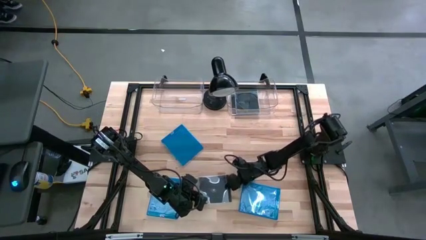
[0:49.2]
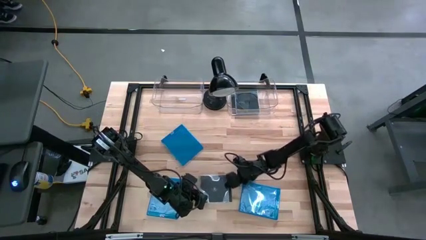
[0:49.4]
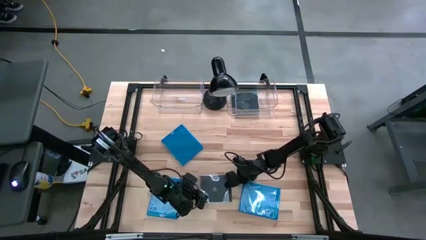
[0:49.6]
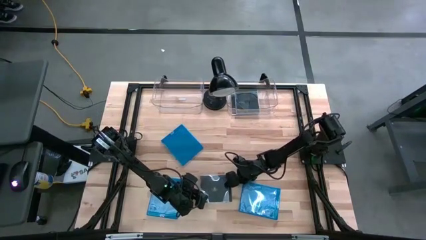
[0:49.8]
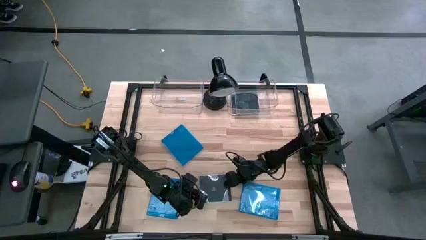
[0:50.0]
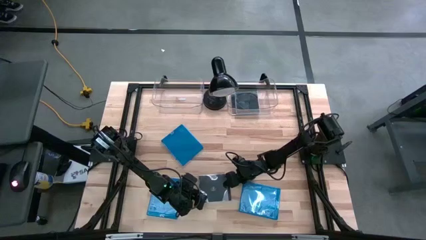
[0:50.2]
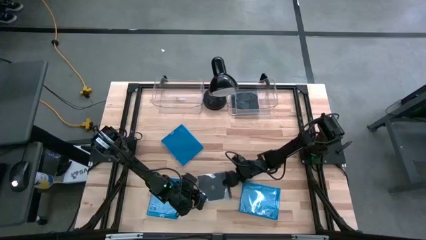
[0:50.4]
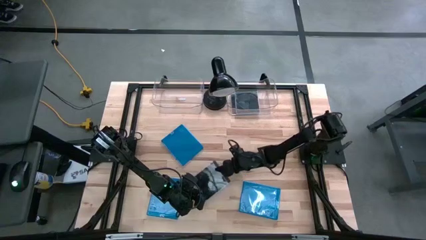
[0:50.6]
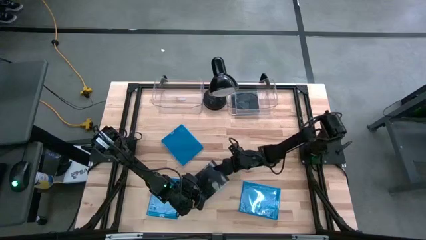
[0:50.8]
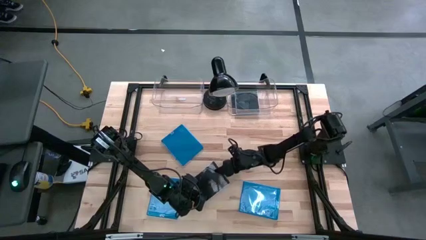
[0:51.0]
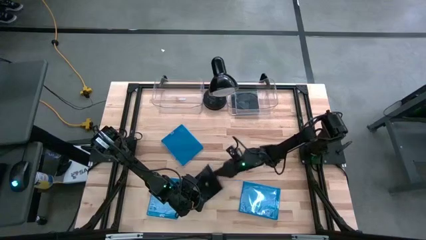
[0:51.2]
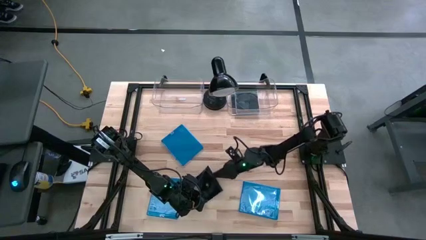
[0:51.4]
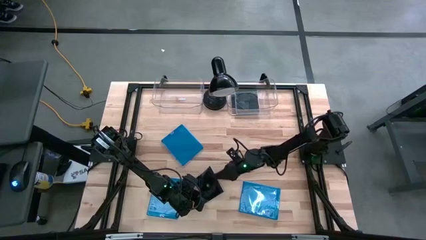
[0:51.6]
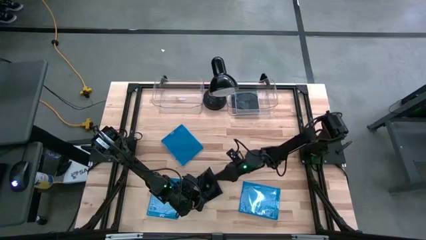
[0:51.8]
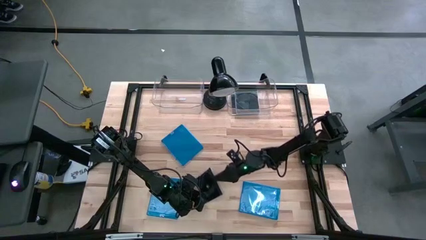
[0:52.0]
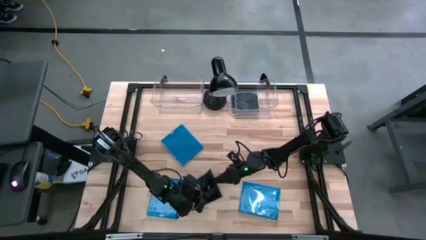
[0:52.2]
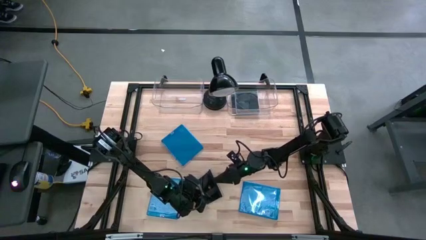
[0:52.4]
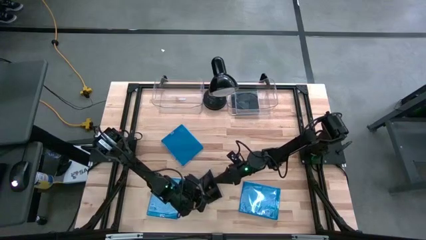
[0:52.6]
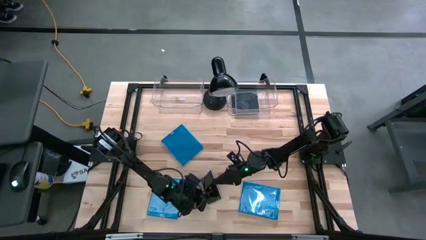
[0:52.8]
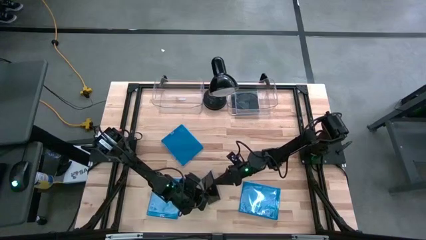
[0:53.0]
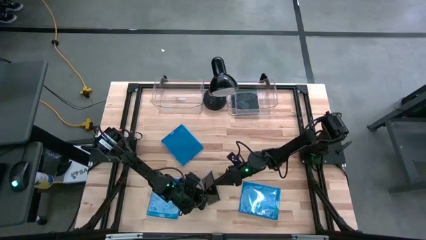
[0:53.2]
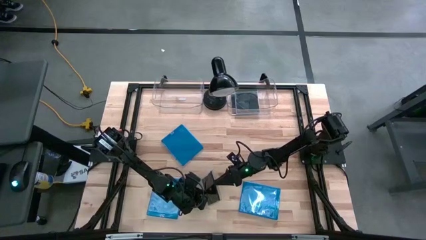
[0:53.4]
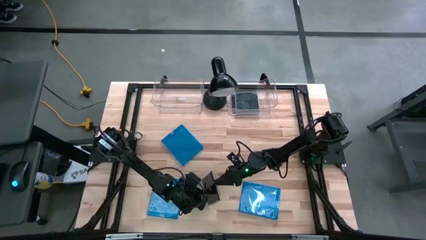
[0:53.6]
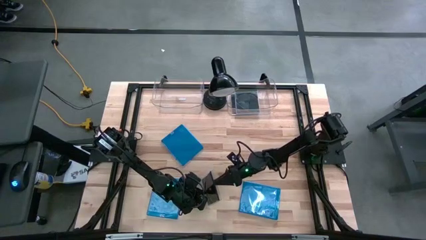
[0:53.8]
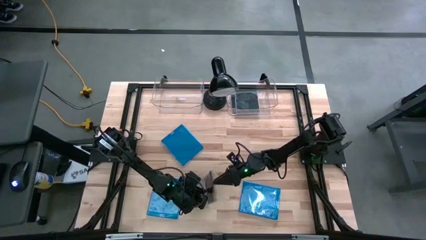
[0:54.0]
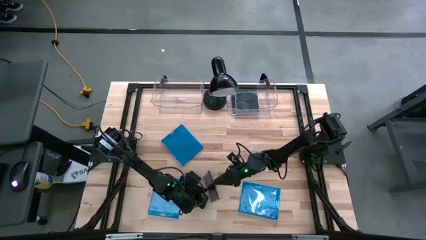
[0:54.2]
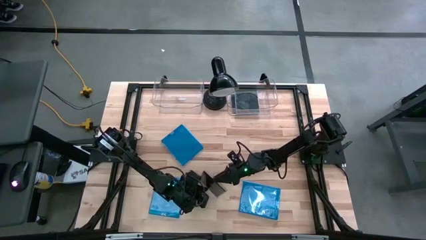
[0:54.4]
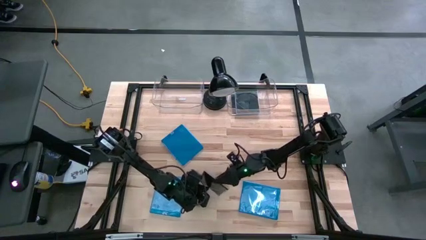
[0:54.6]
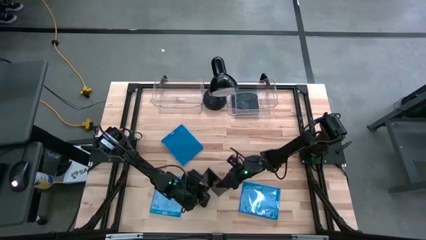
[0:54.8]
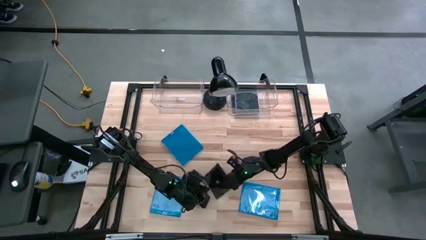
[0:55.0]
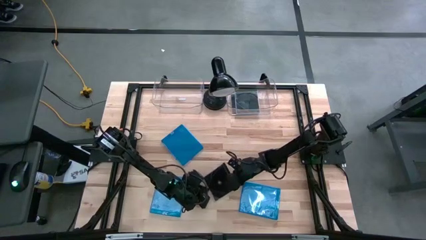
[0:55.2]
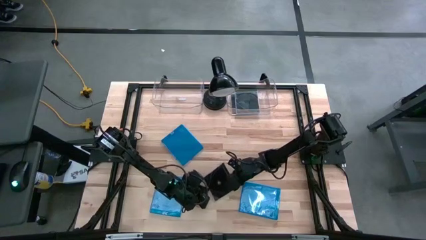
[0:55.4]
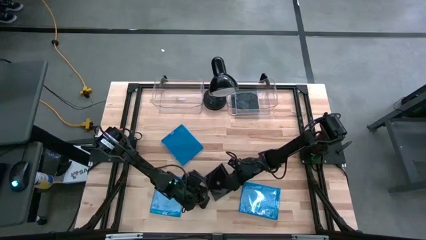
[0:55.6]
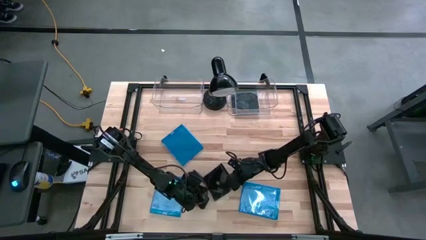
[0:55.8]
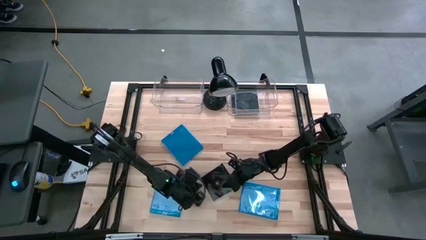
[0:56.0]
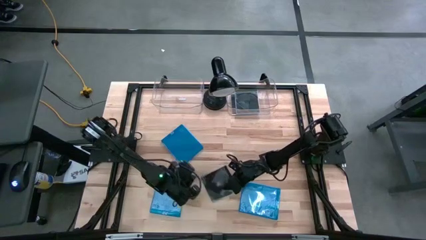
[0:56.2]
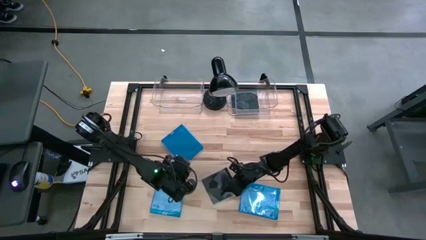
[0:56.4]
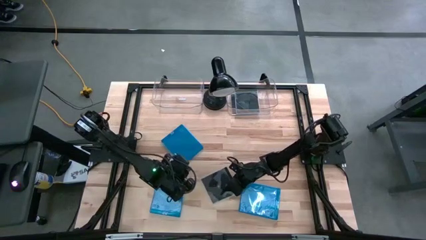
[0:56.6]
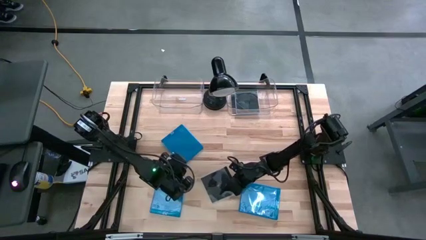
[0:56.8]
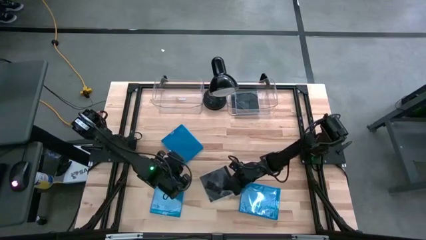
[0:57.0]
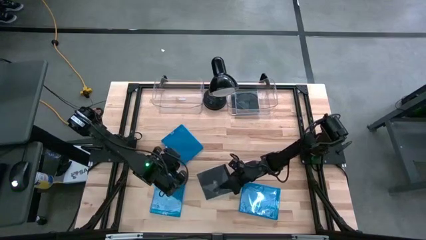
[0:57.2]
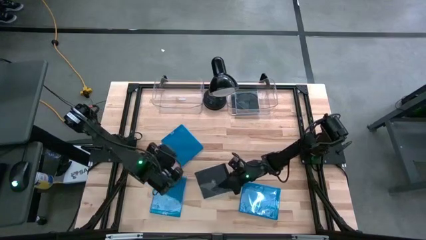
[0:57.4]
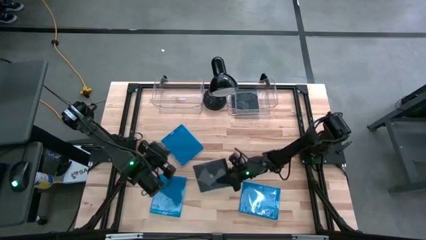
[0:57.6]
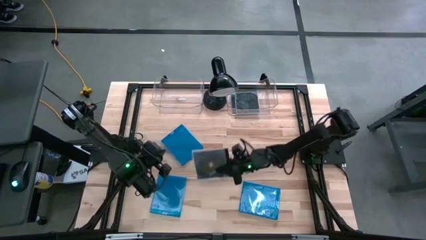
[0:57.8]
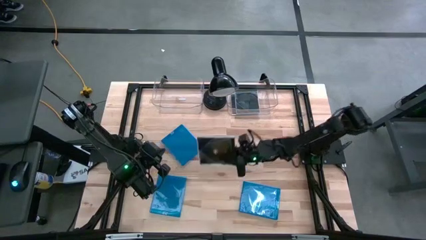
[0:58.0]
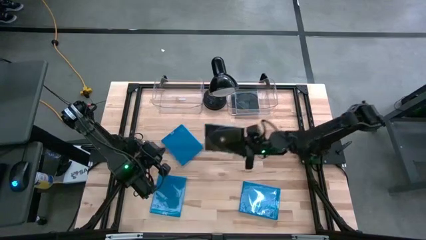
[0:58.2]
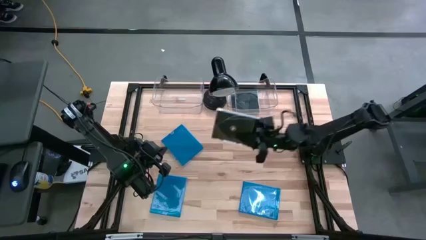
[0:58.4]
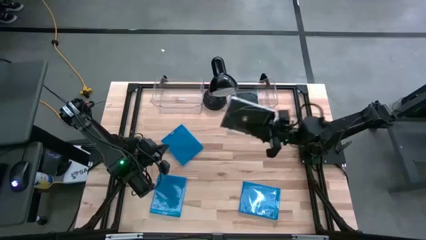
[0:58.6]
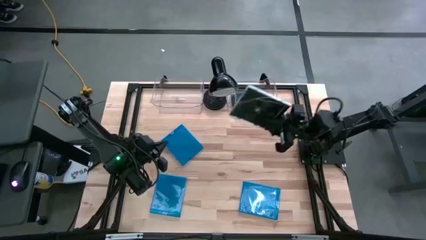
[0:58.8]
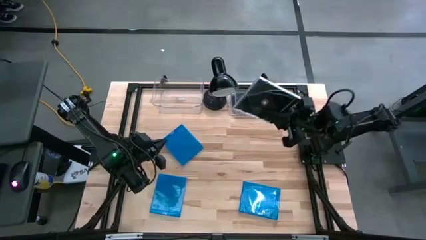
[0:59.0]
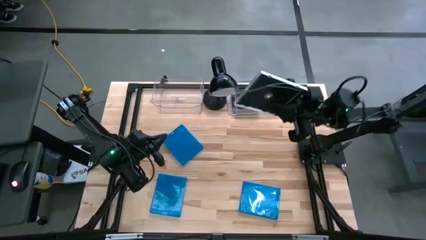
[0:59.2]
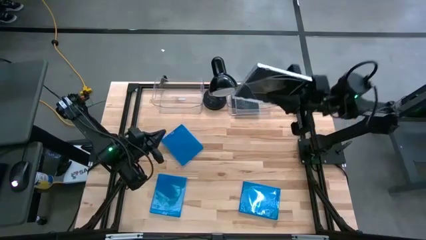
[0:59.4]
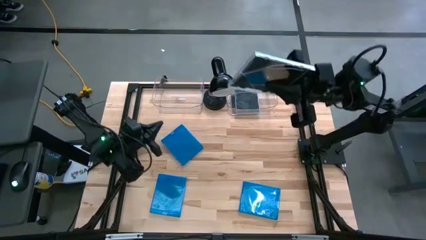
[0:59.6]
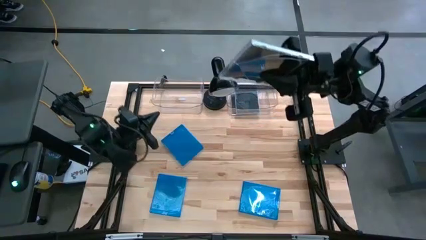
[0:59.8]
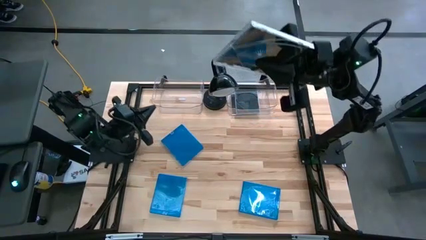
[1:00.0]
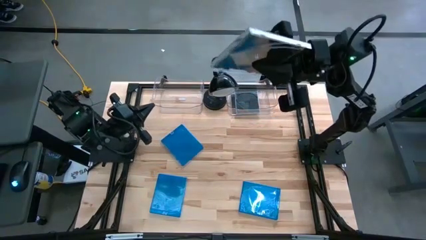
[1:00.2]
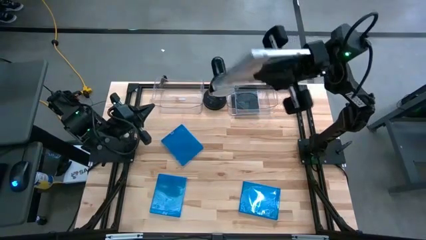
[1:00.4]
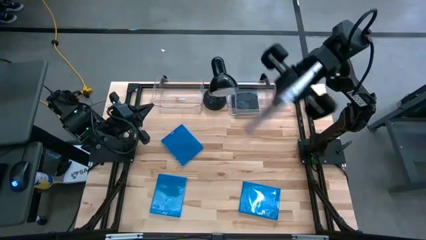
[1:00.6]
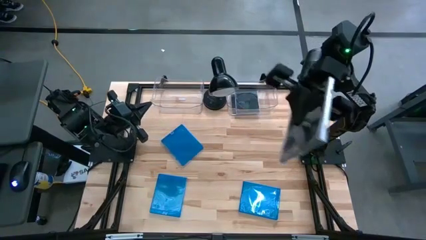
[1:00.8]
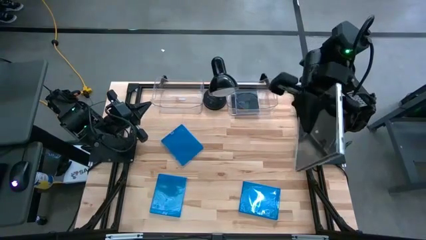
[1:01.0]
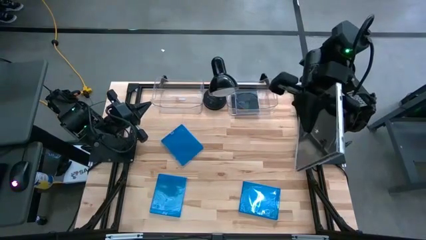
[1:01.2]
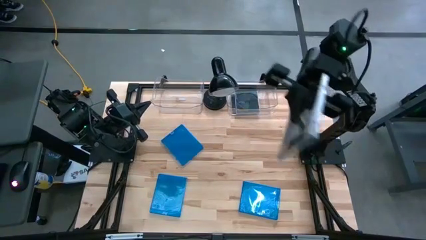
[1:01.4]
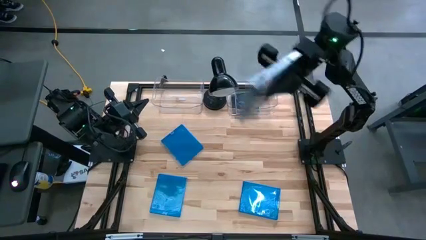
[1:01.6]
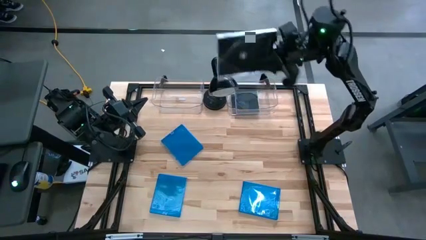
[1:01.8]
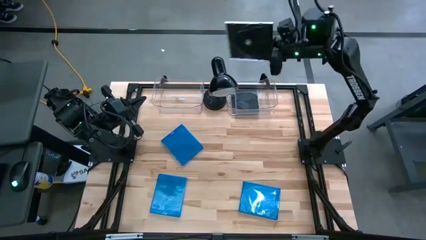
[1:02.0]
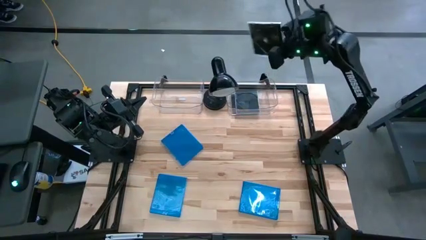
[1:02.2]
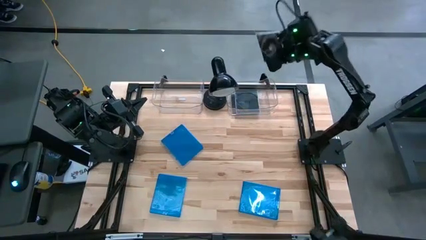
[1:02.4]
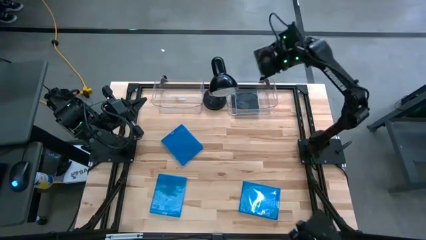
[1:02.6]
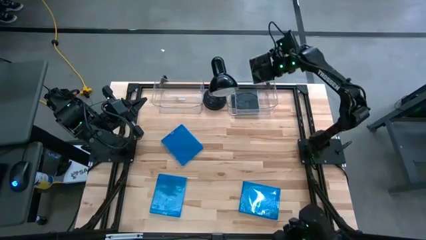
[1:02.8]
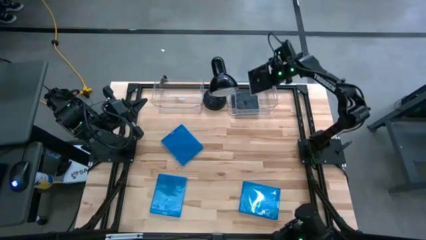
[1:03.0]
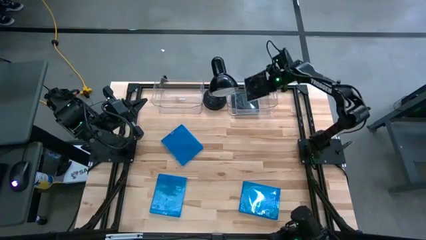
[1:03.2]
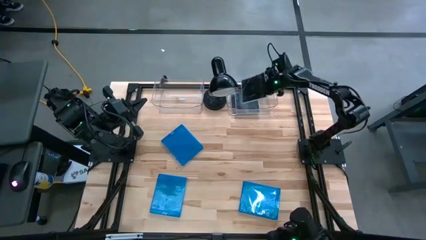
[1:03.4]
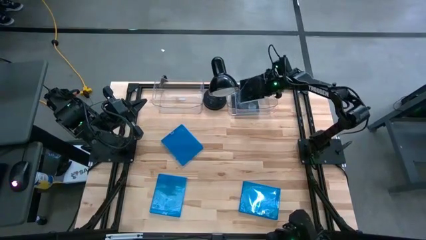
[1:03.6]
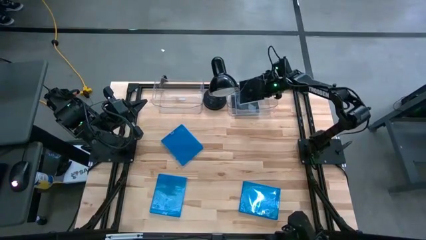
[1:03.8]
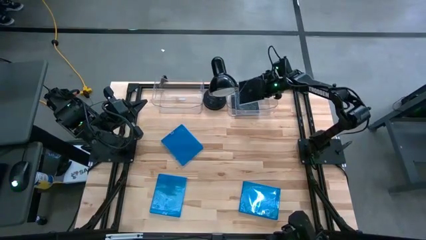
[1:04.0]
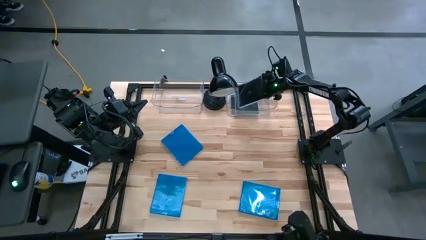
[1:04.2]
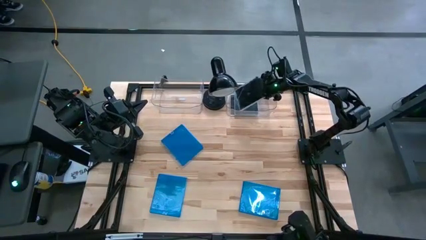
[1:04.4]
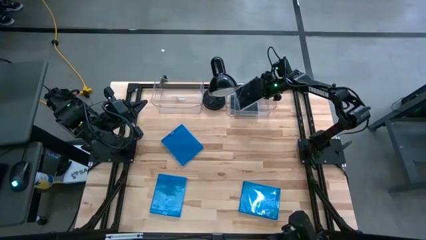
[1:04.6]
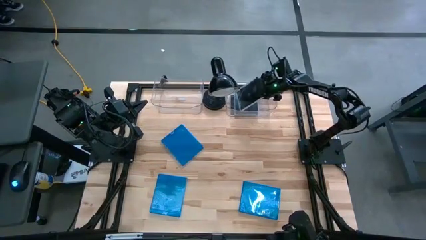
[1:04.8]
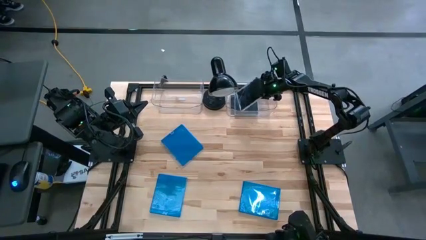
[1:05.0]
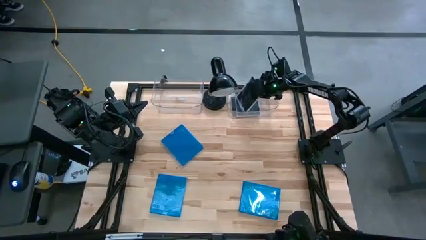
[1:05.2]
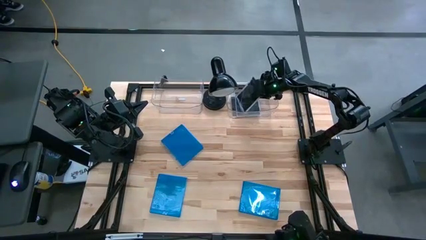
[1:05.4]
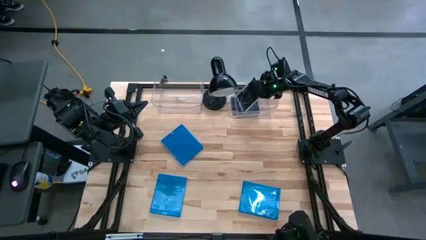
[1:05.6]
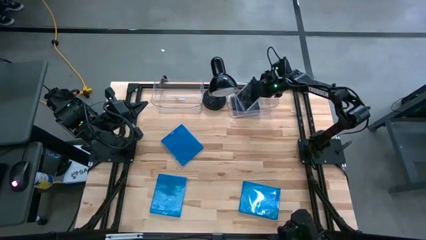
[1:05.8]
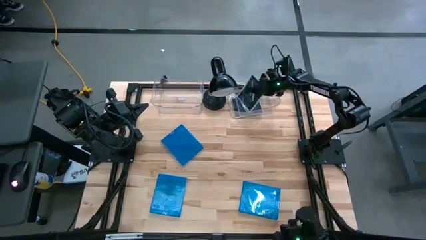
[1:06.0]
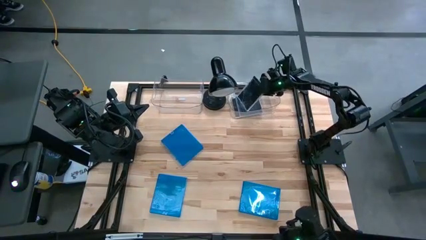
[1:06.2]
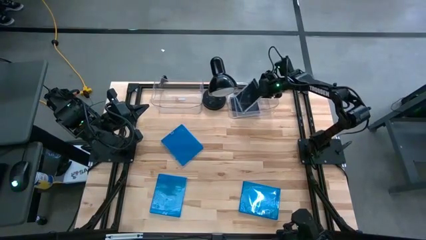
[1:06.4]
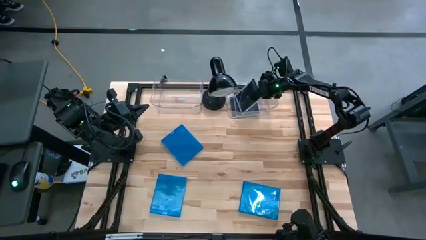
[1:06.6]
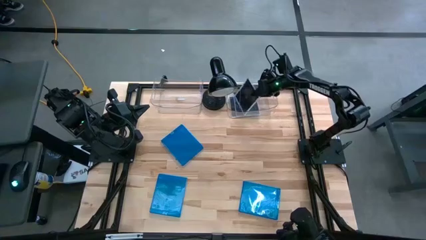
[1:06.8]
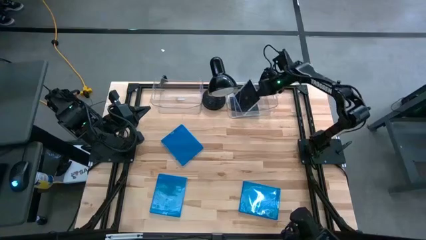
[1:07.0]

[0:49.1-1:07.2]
Task: Pick & place jewel cases by type
Put the black CD case into the right transparent bin
